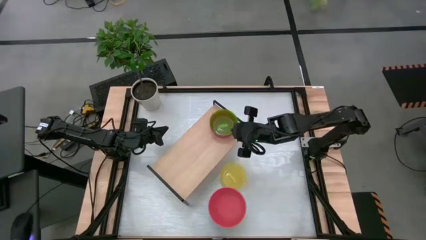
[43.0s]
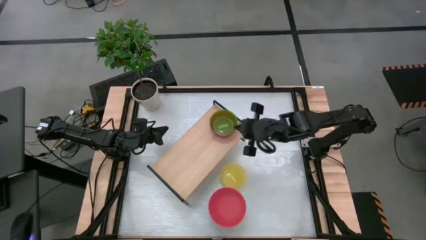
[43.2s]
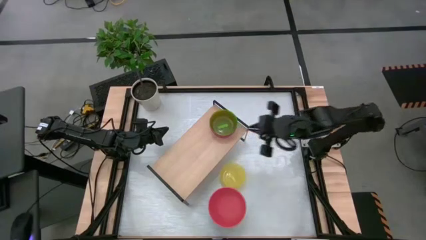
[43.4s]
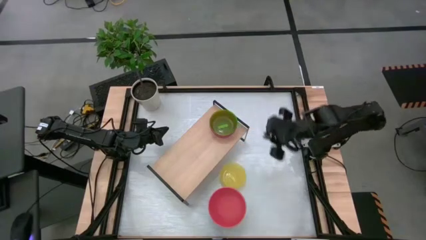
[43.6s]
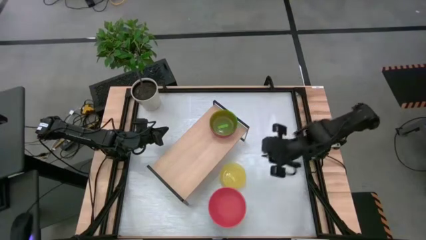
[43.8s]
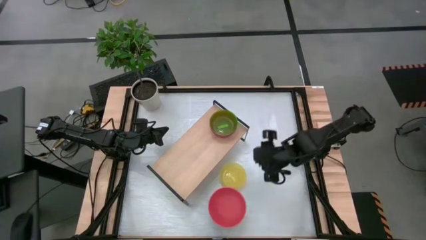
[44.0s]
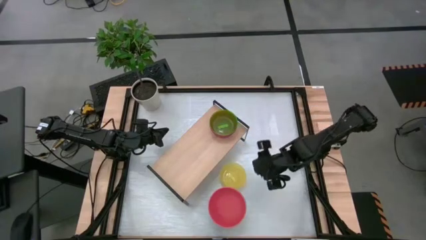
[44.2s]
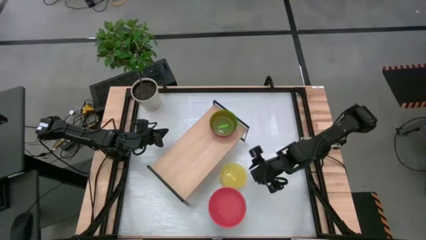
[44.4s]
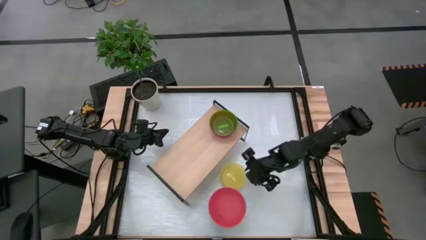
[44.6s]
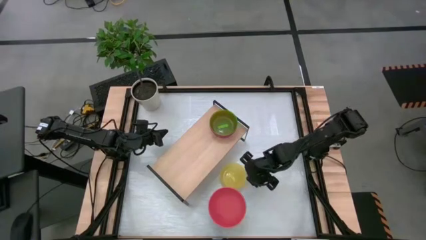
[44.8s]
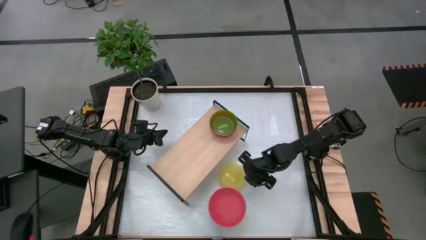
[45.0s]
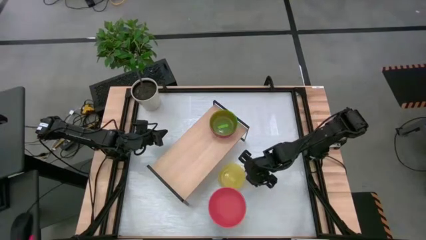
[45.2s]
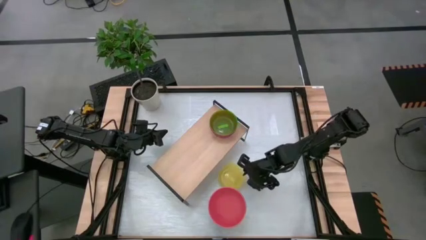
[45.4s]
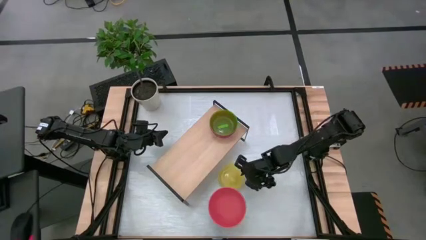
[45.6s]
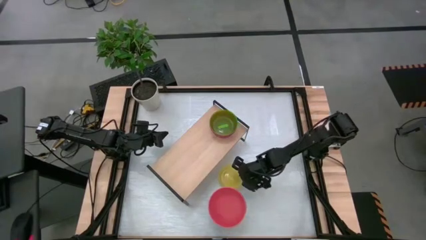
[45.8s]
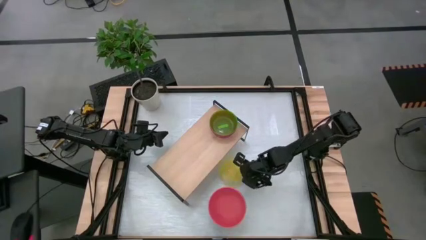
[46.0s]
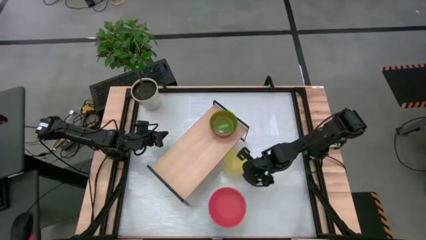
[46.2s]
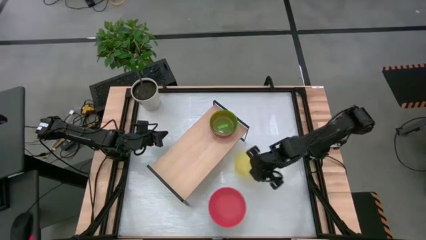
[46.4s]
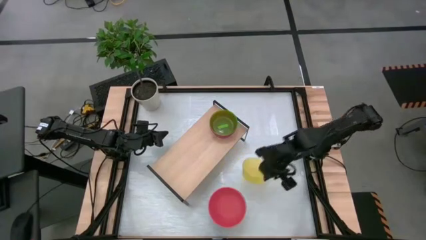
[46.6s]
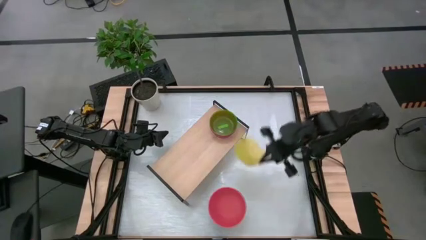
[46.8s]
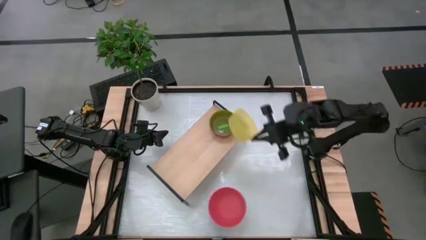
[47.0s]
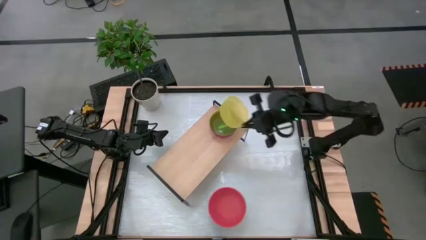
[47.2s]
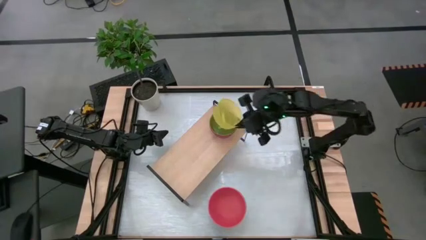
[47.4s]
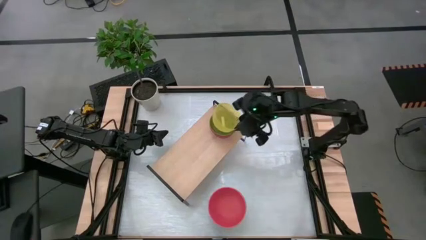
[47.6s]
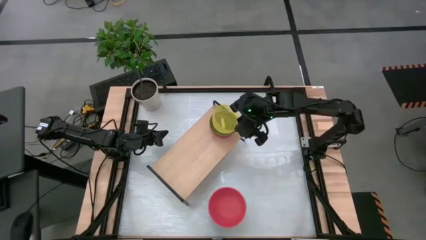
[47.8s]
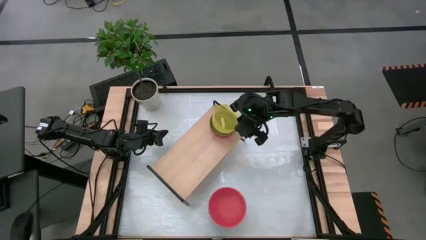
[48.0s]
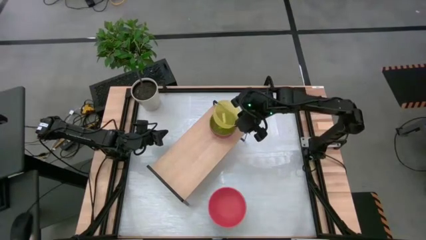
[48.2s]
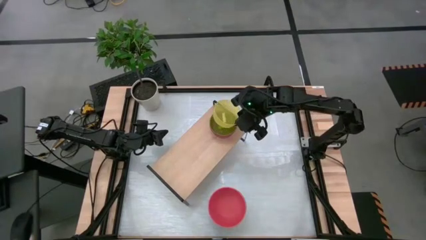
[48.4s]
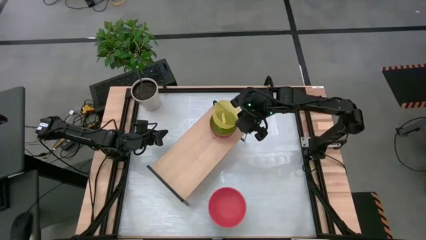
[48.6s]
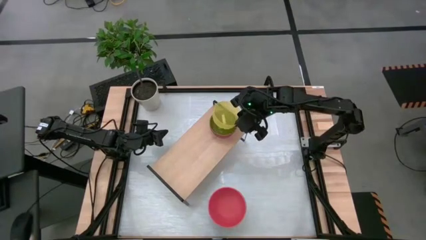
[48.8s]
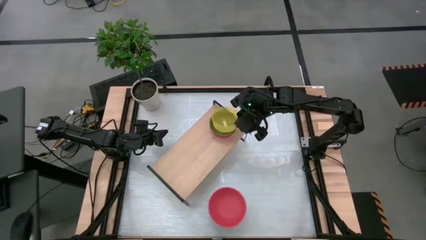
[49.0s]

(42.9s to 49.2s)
Task: Place and stack bowls onto a shelf
Stack the yellow bowl on top of the green bowl into the shelf

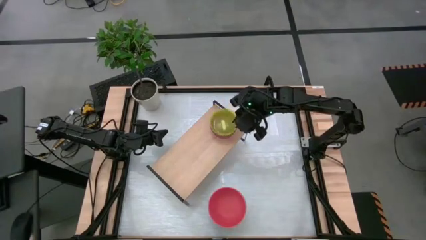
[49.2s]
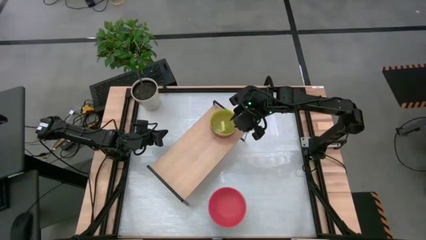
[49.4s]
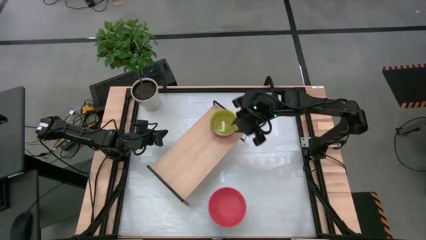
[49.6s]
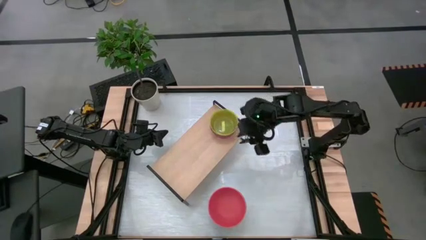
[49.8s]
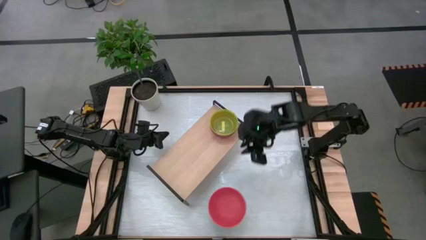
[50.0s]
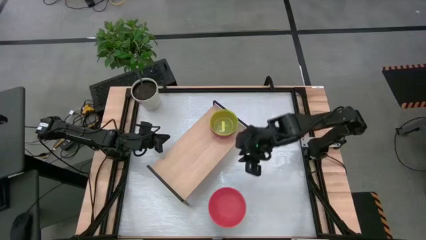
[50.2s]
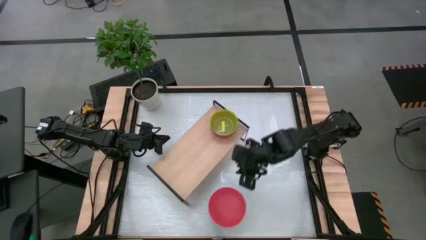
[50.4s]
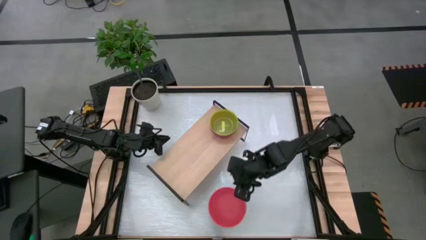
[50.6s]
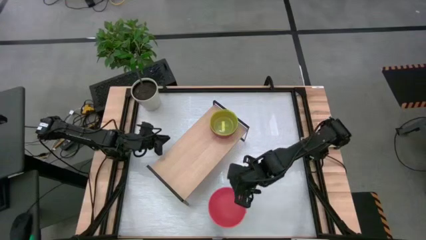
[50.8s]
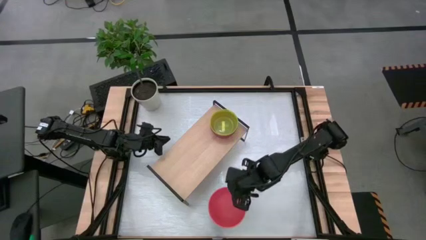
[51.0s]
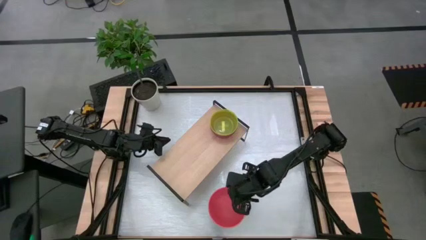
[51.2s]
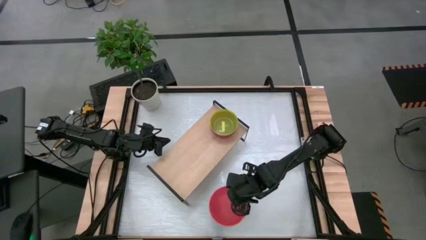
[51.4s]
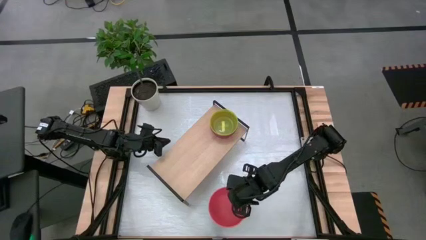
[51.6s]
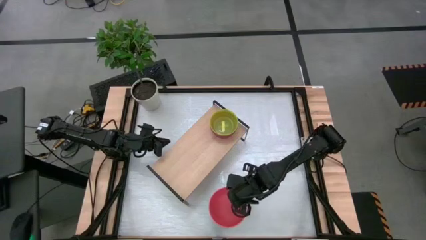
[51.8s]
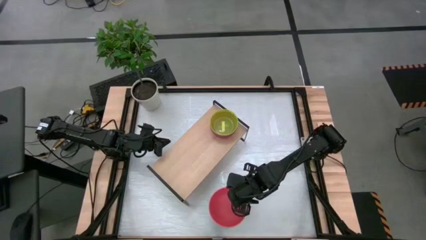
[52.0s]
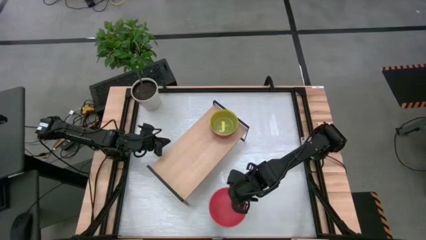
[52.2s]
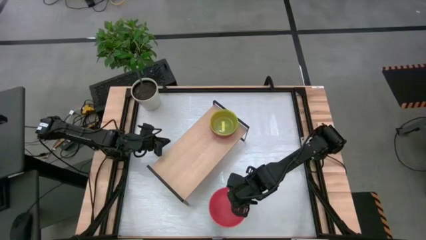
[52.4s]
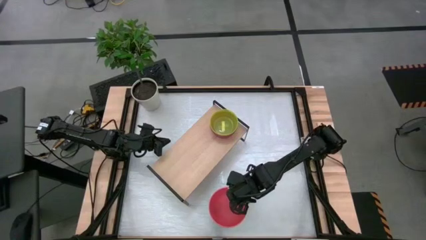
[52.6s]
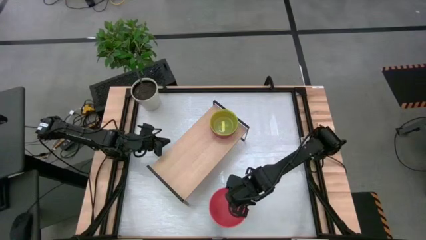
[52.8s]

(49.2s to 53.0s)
Put the red bowl into the shelf

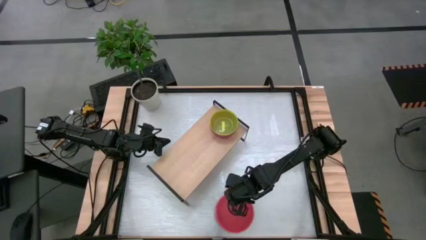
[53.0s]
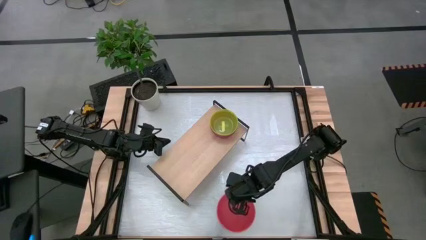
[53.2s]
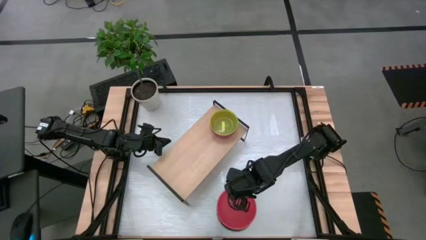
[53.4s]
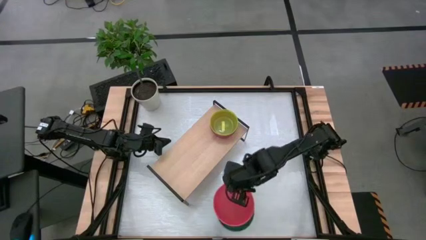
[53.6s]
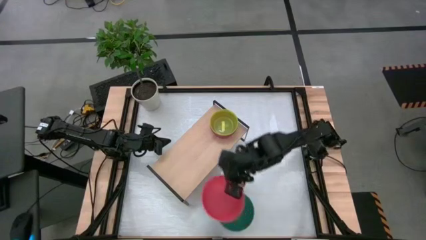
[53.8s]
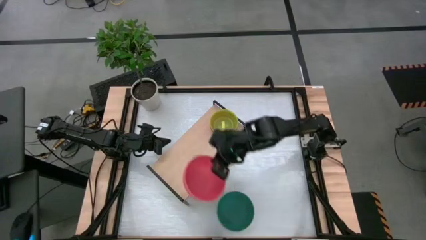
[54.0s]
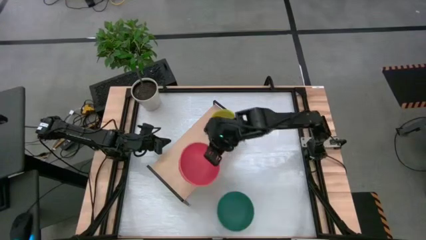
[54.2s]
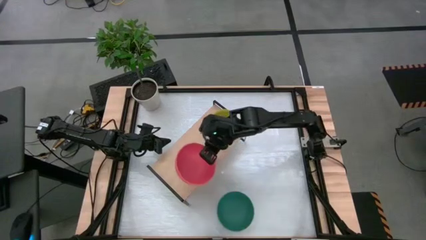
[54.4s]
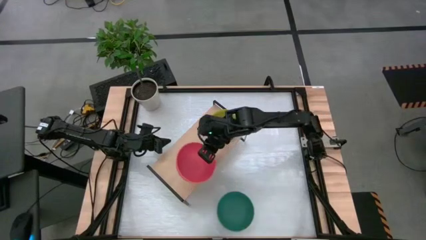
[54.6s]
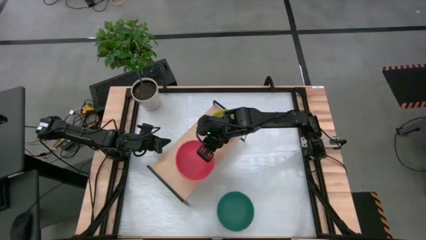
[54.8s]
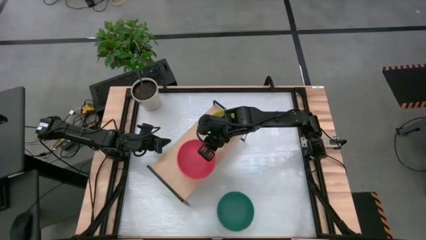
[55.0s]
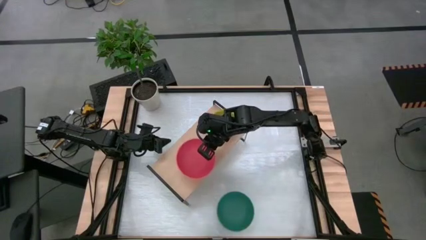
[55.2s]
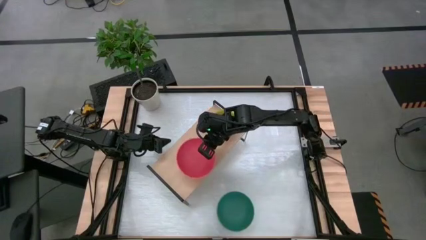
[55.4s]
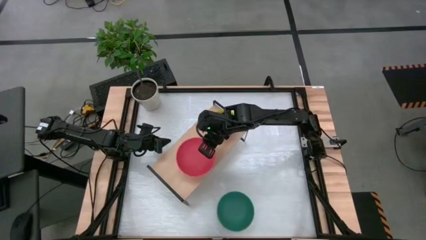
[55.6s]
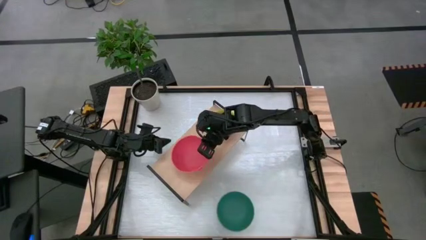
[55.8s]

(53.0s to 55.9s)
Put the red bowl into the shelf
